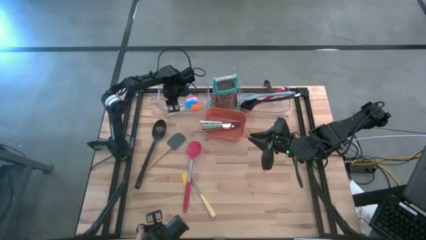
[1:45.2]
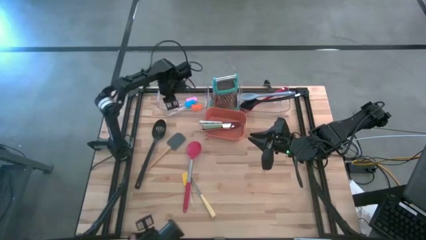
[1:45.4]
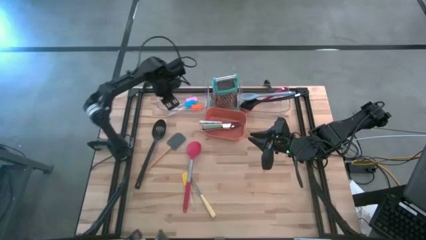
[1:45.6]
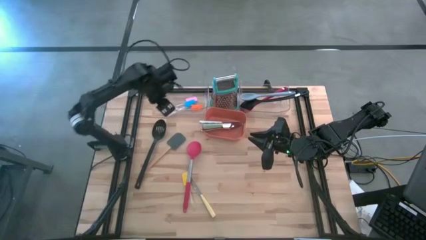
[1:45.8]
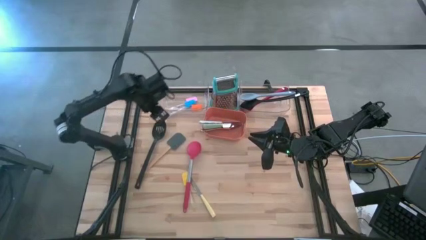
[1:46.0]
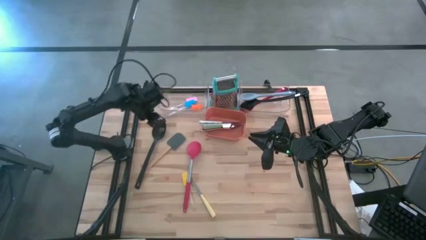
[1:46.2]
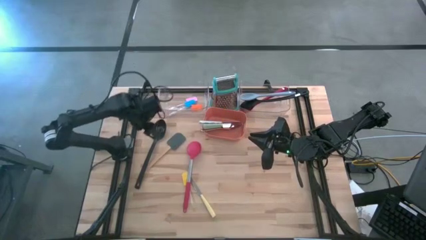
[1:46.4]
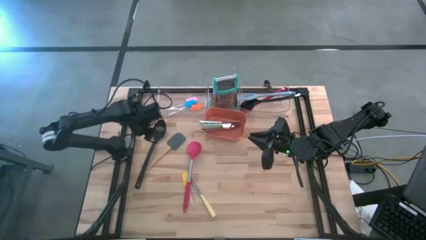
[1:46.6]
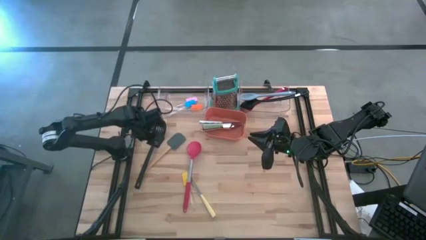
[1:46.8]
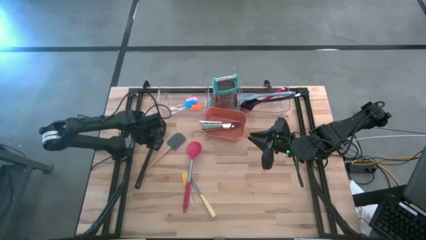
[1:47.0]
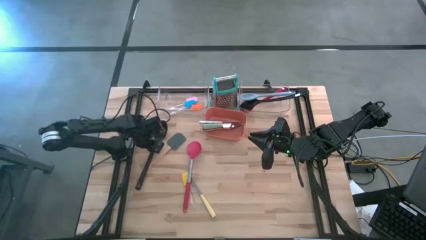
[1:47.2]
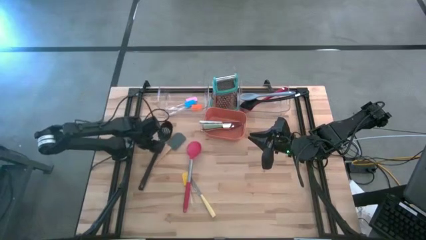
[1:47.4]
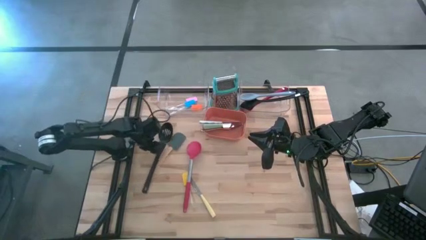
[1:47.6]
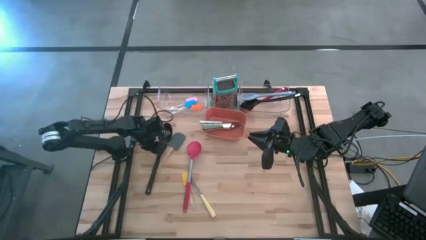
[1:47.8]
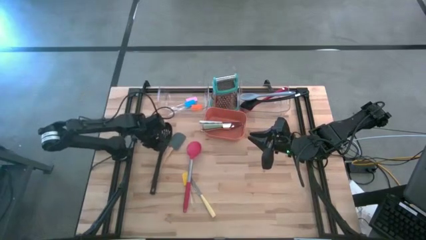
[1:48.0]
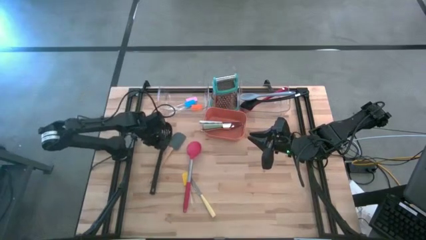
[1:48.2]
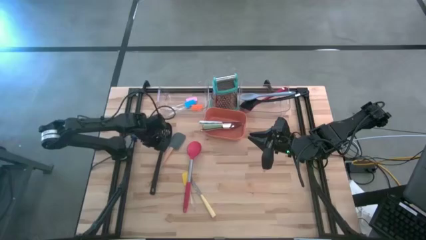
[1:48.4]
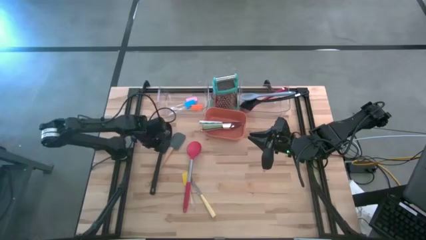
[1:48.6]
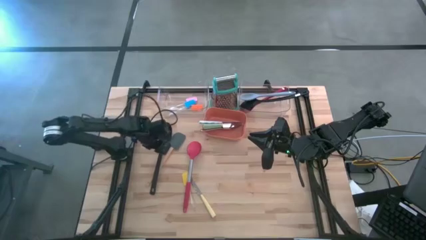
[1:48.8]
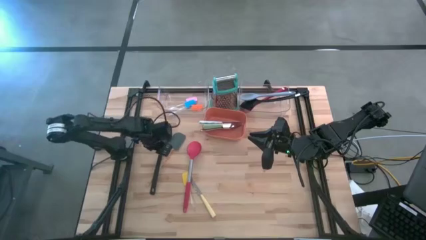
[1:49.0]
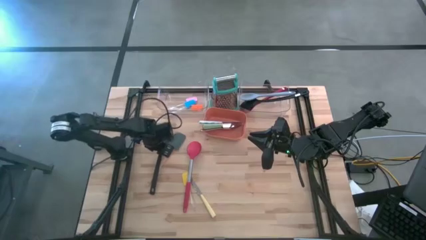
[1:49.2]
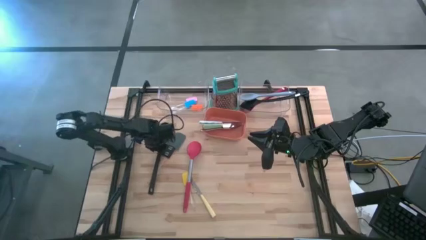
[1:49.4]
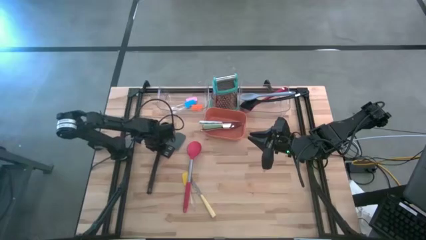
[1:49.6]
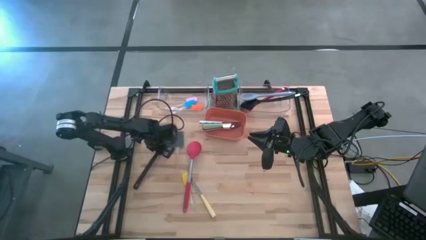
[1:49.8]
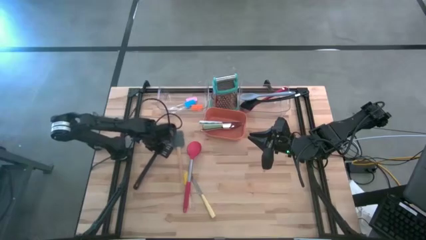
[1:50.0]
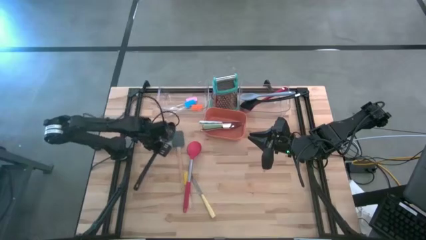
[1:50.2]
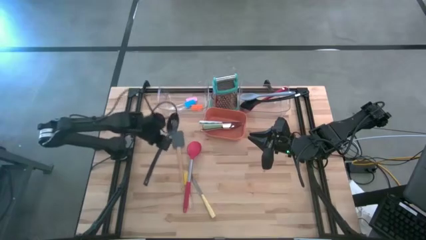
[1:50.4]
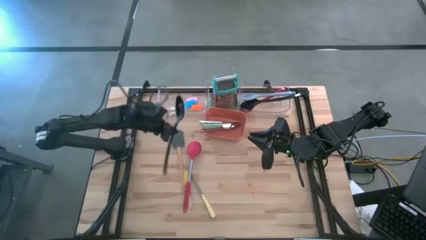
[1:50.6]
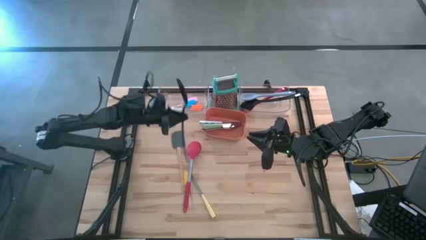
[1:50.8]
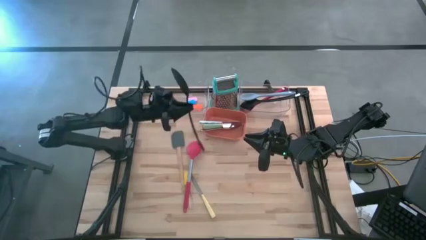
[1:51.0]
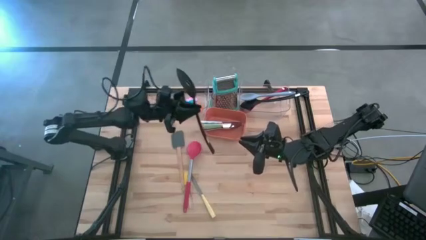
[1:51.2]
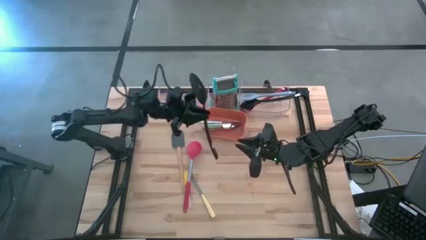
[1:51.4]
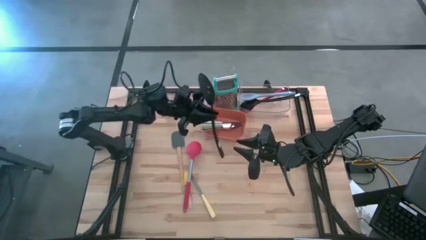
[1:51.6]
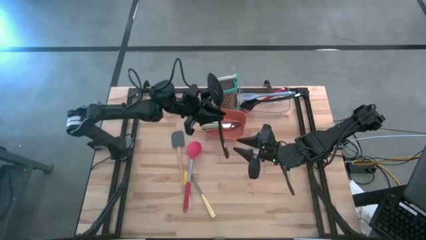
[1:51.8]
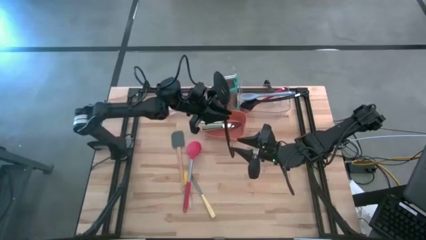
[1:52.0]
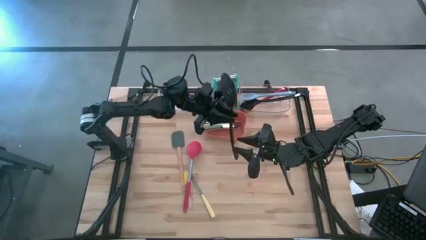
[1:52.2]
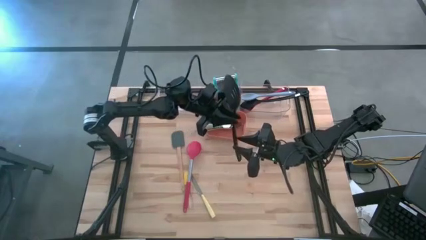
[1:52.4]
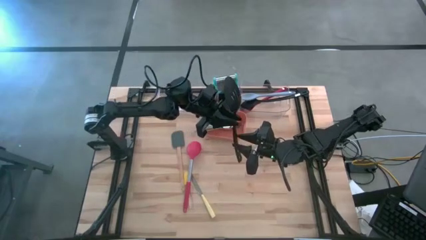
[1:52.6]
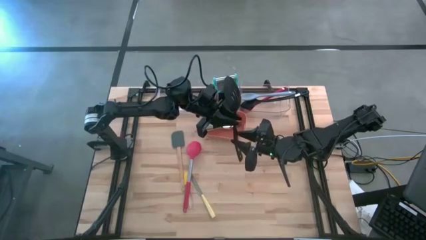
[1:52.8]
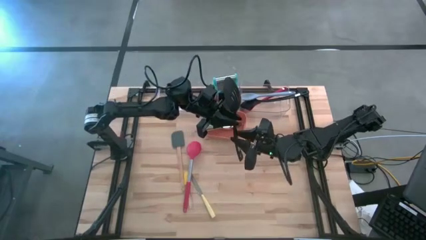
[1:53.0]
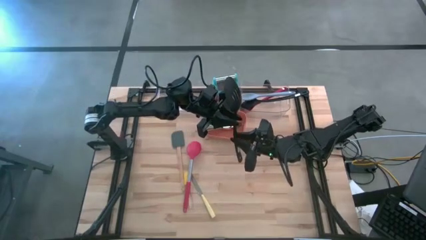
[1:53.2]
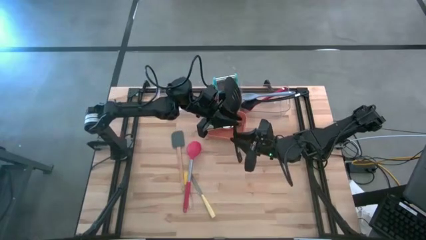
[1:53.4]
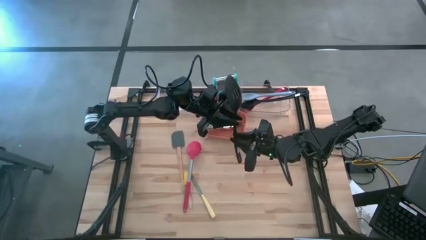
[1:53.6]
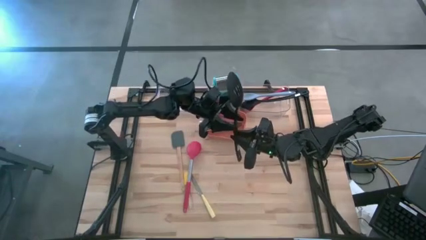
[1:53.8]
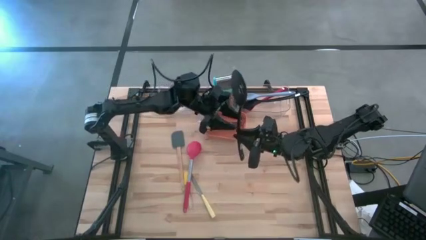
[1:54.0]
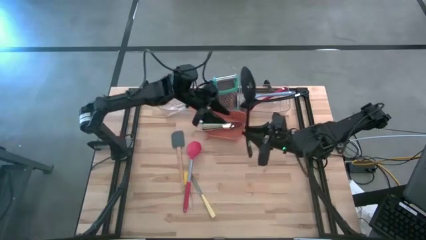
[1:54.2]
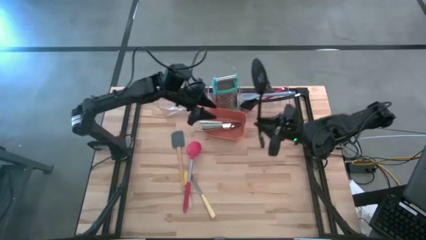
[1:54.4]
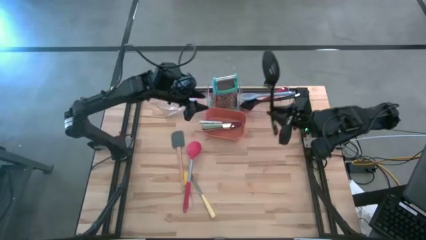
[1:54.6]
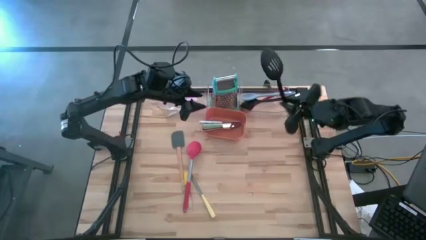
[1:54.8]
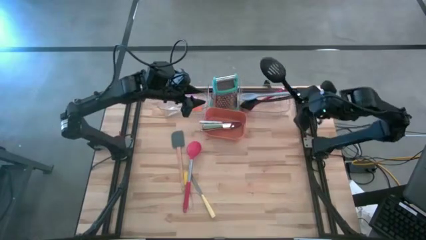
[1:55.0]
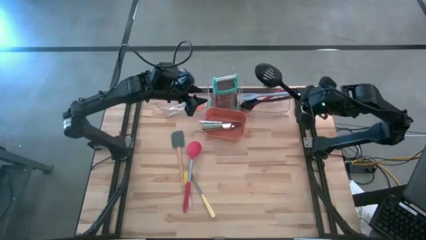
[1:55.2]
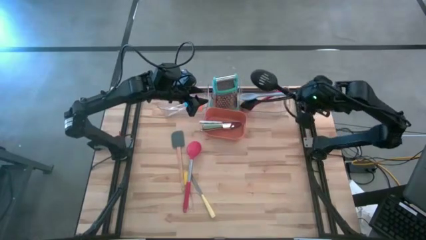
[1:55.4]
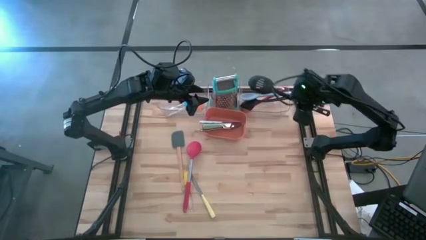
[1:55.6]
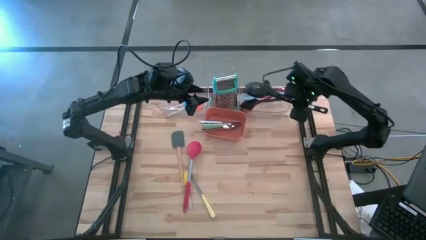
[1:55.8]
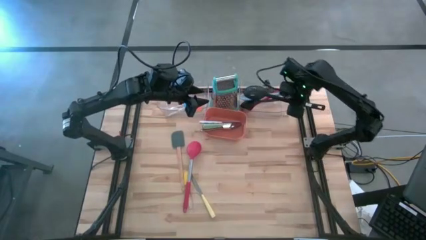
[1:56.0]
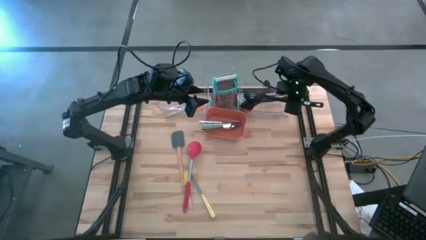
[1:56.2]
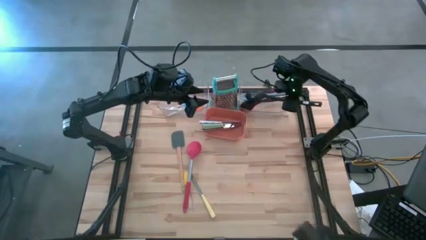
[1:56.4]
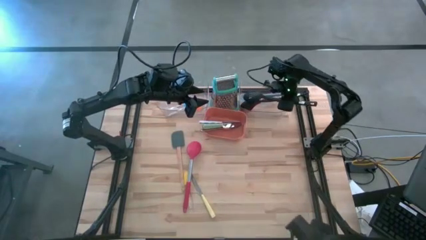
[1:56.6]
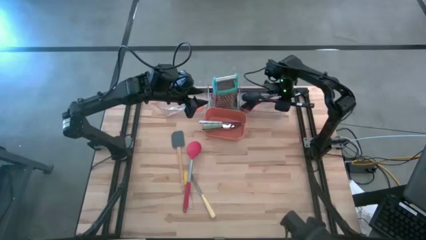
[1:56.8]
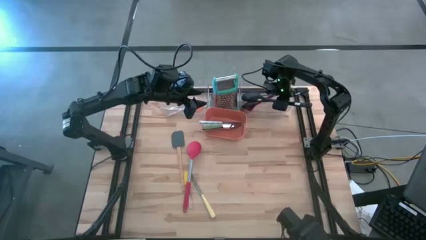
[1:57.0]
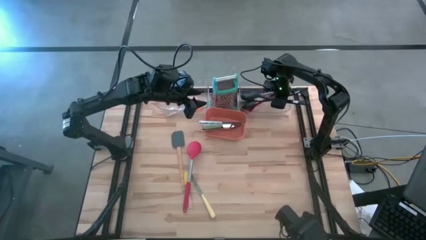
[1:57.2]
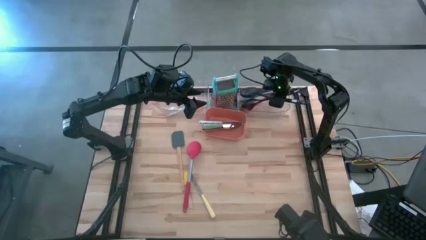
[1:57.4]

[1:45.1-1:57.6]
Task: Pick & Place Kitchen Items
Put the black serving spoon into the right transparent bin

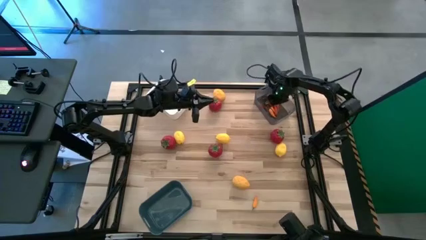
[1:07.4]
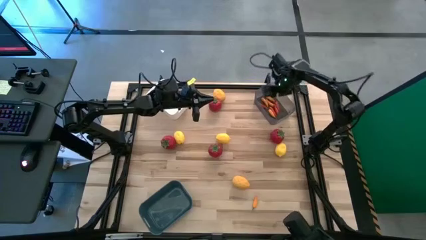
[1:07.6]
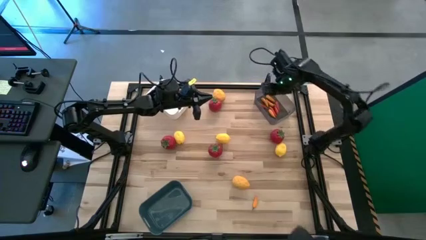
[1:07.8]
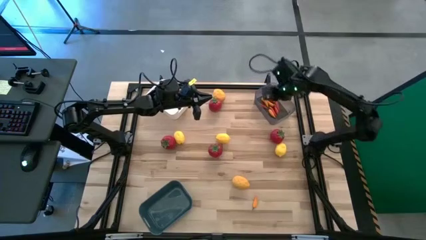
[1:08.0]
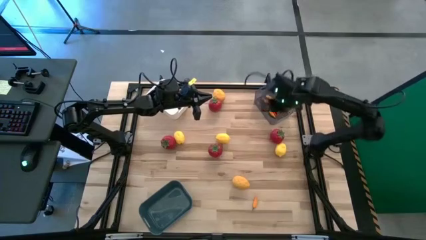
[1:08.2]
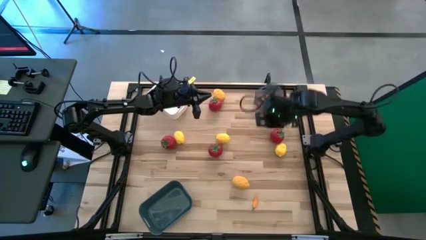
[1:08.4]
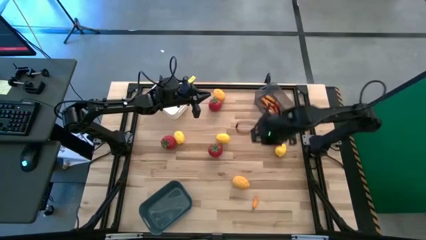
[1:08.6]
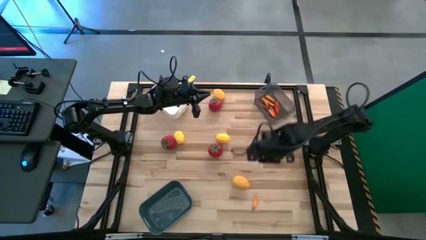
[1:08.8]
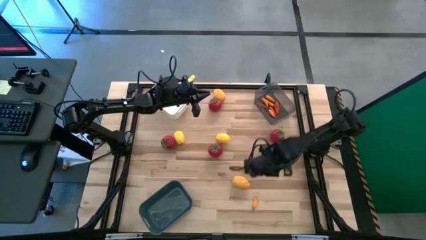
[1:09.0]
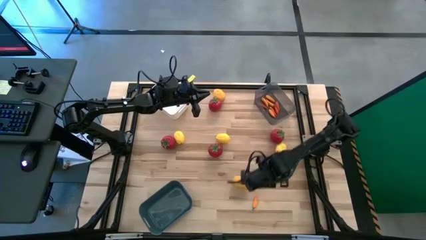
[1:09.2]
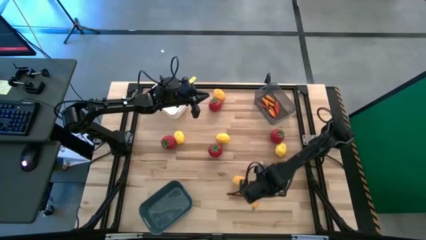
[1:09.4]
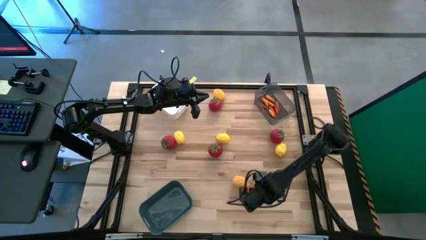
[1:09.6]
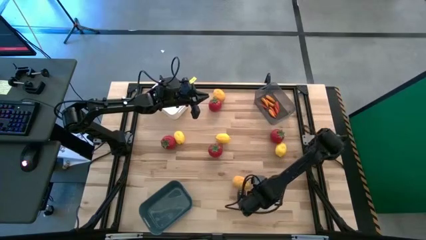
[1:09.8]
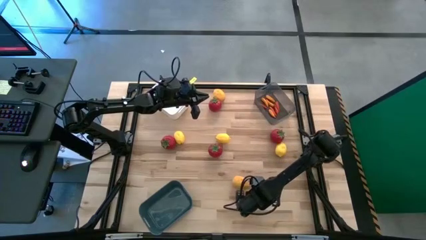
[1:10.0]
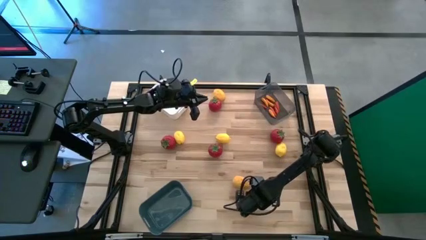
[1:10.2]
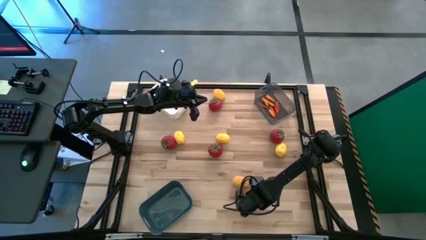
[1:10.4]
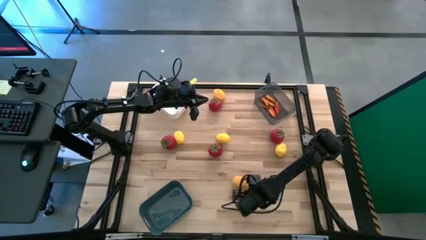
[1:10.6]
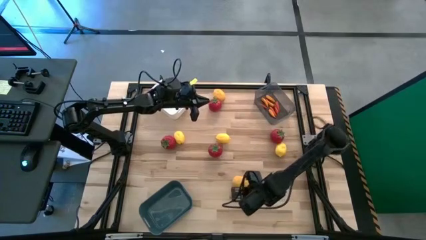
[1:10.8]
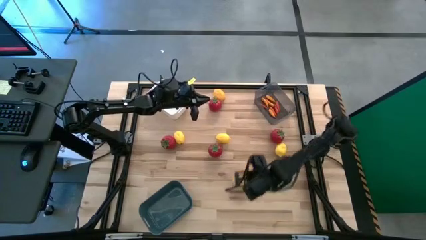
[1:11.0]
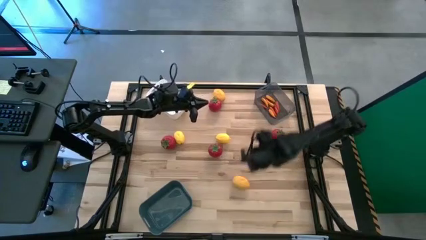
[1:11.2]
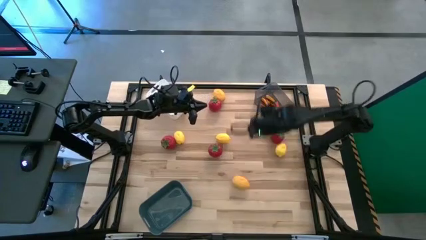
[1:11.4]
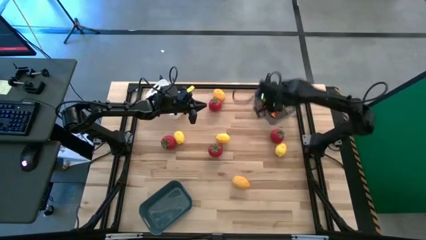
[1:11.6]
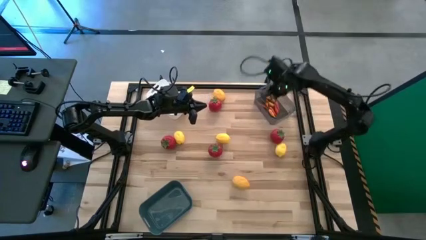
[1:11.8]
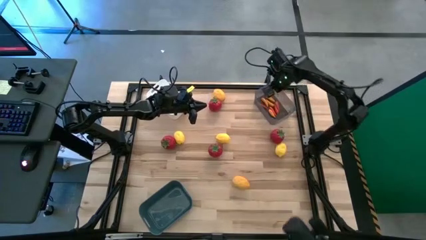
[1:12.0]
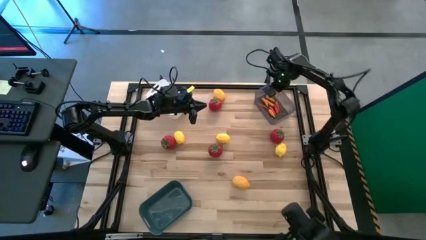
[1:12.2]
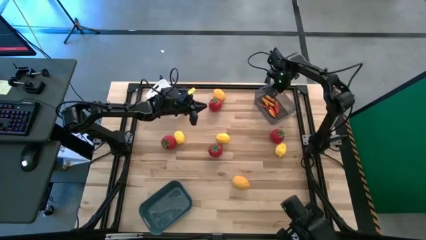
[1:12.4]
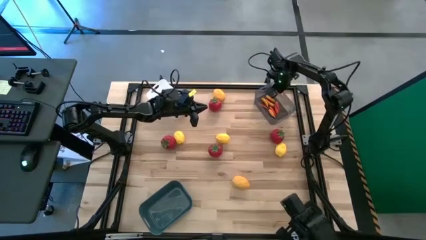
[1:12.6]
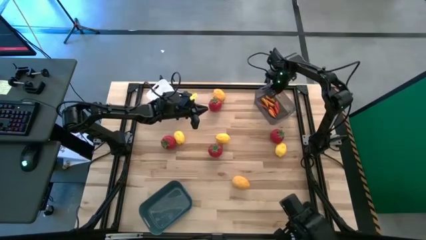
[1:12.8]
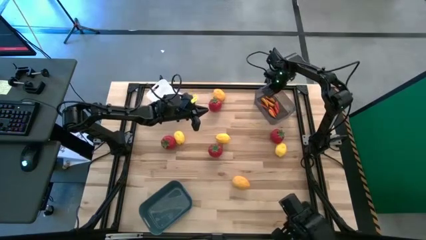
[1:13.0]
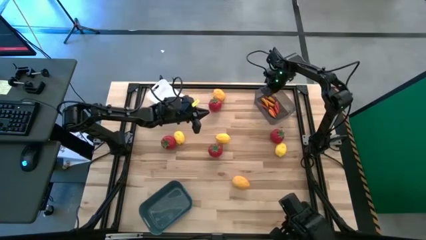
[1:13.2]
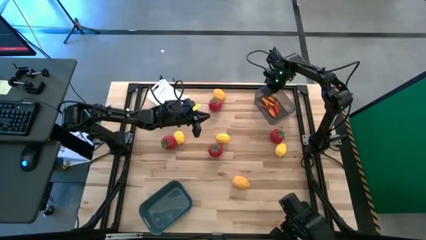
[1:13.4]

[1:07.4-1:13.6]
Task: Sort produce into baskets
Put the orange chili pepper into the black transparent bin
